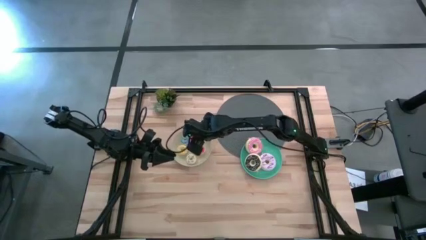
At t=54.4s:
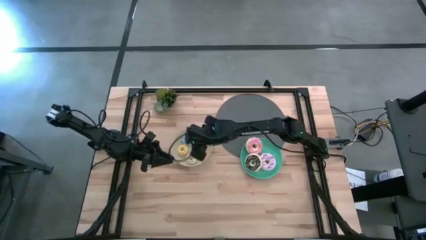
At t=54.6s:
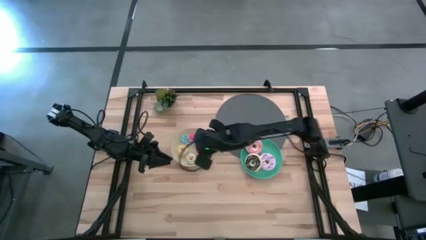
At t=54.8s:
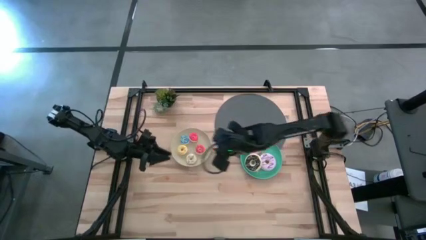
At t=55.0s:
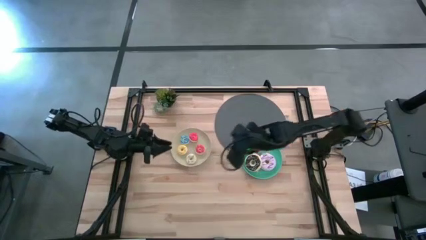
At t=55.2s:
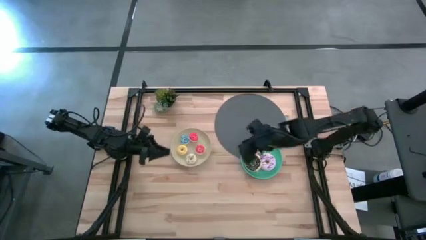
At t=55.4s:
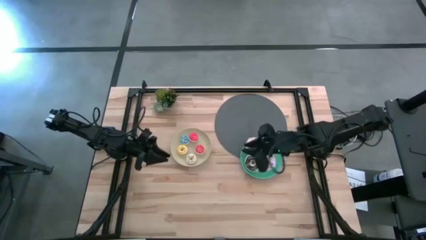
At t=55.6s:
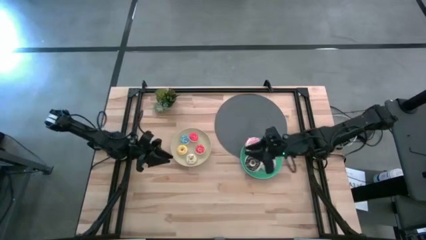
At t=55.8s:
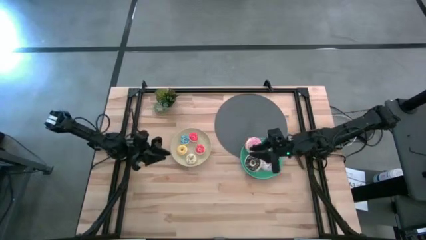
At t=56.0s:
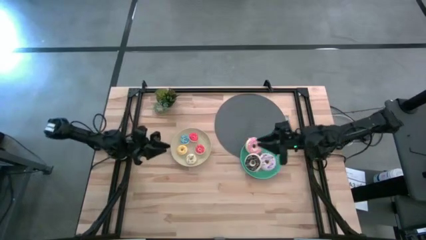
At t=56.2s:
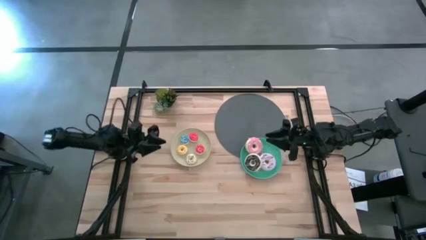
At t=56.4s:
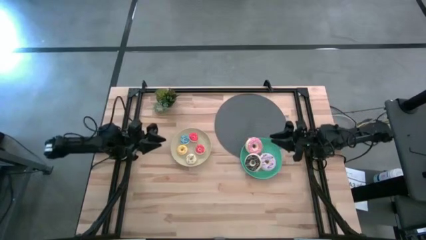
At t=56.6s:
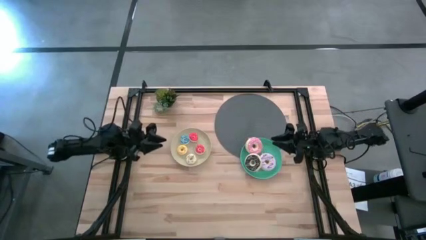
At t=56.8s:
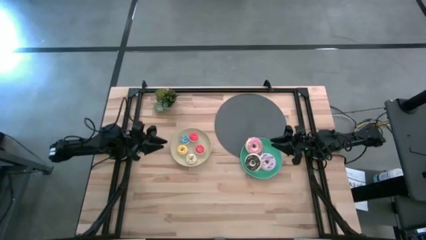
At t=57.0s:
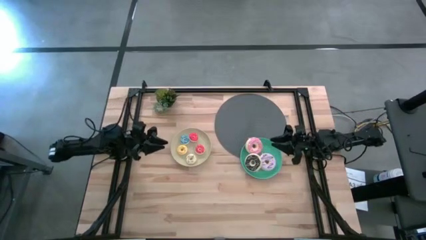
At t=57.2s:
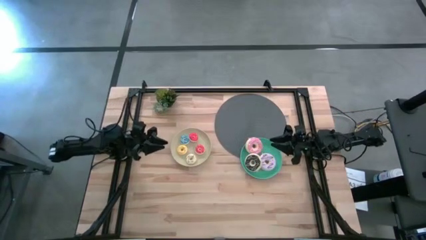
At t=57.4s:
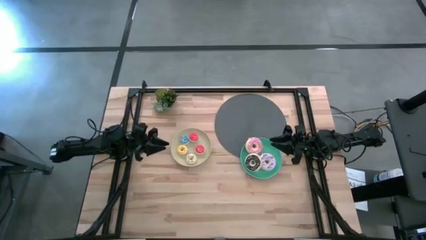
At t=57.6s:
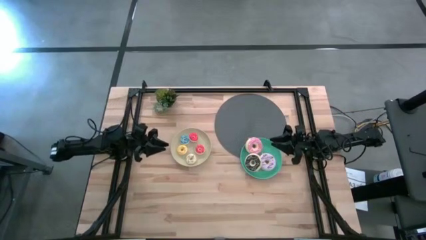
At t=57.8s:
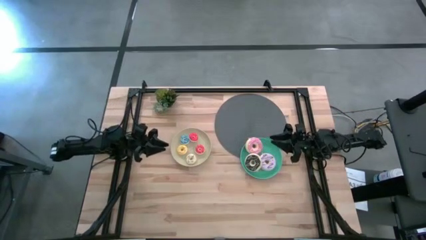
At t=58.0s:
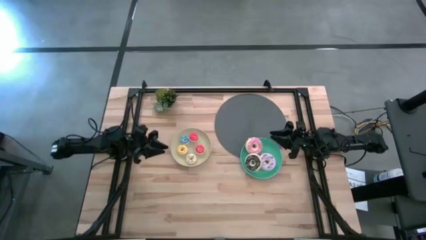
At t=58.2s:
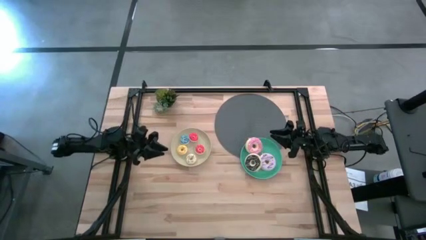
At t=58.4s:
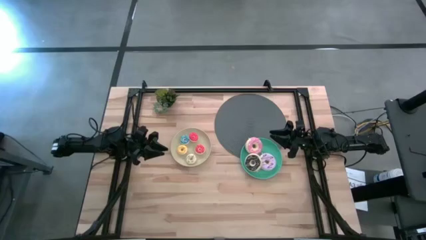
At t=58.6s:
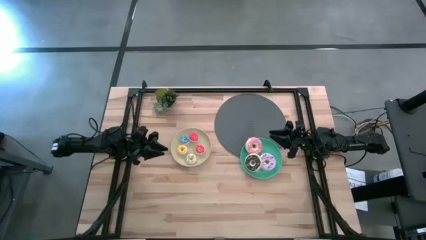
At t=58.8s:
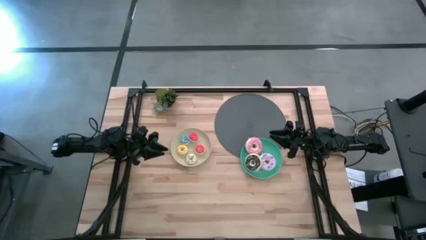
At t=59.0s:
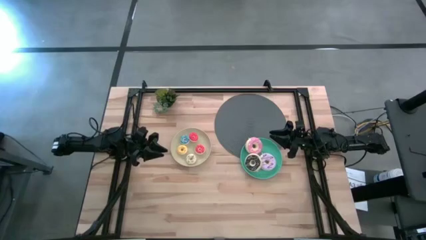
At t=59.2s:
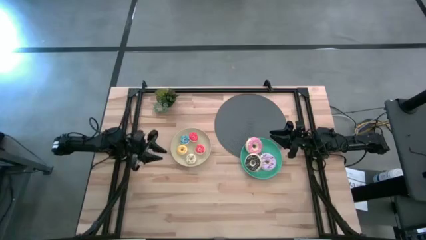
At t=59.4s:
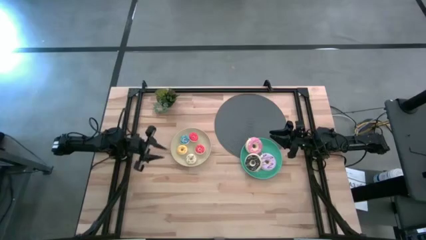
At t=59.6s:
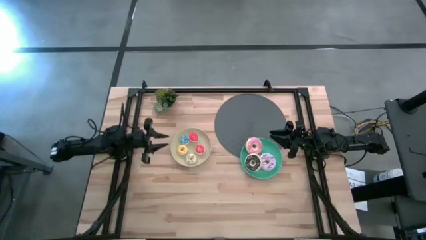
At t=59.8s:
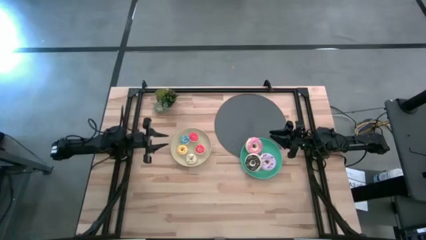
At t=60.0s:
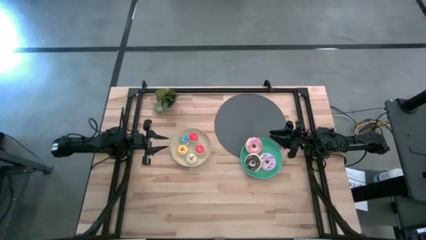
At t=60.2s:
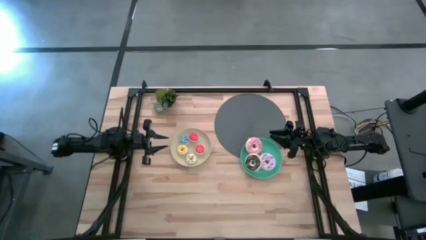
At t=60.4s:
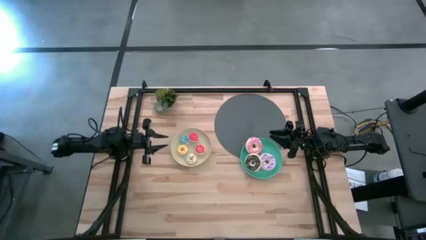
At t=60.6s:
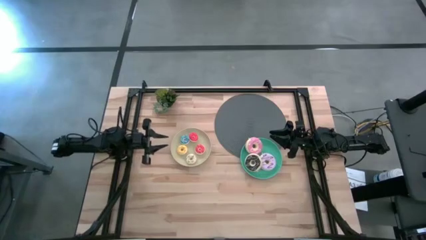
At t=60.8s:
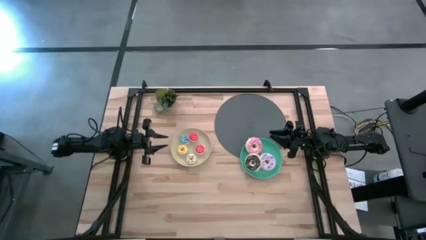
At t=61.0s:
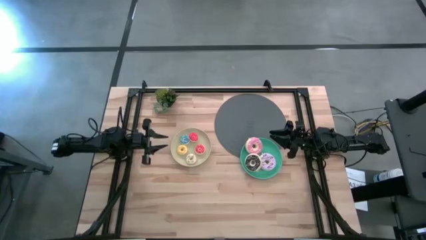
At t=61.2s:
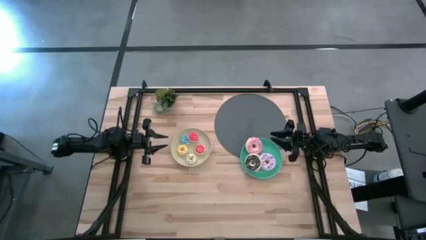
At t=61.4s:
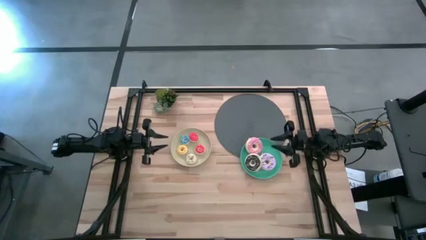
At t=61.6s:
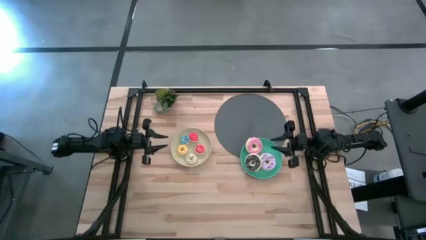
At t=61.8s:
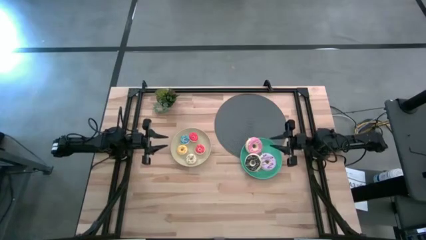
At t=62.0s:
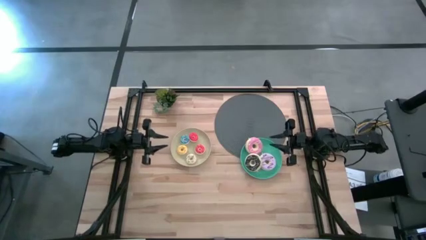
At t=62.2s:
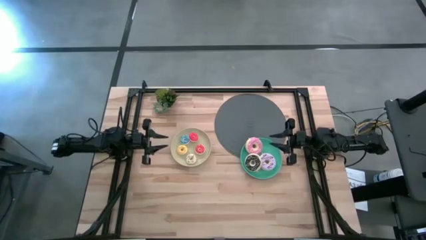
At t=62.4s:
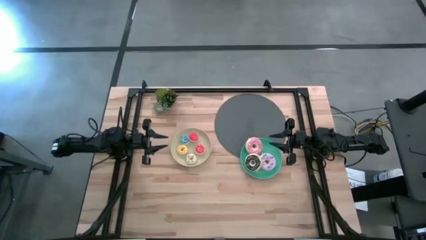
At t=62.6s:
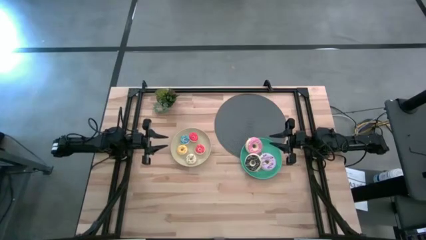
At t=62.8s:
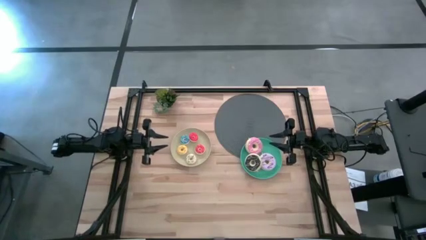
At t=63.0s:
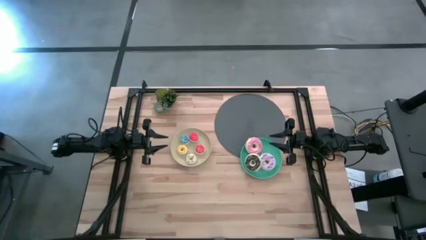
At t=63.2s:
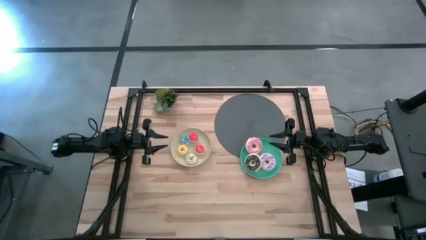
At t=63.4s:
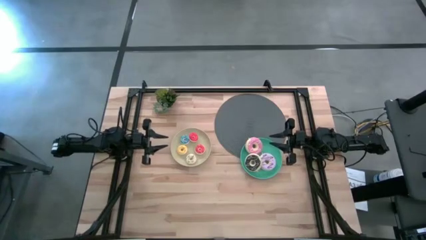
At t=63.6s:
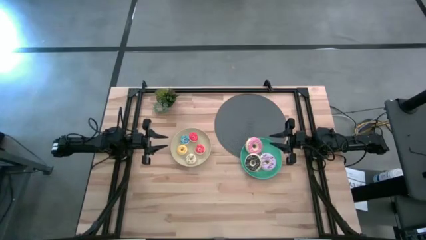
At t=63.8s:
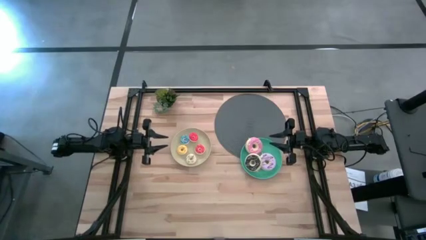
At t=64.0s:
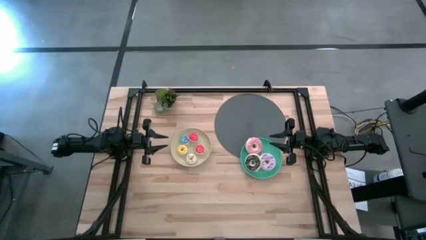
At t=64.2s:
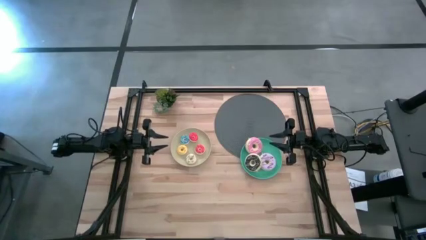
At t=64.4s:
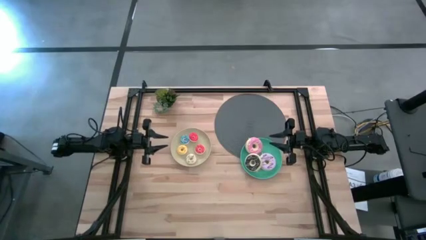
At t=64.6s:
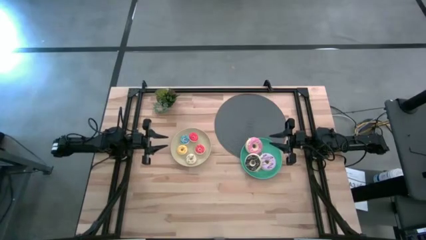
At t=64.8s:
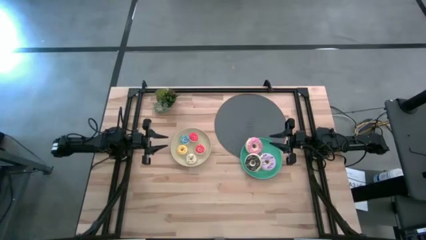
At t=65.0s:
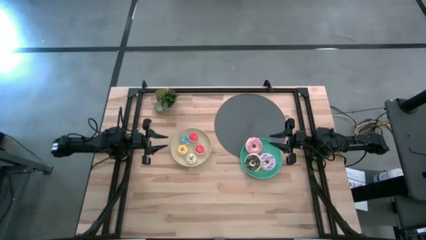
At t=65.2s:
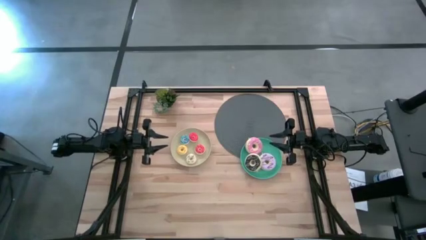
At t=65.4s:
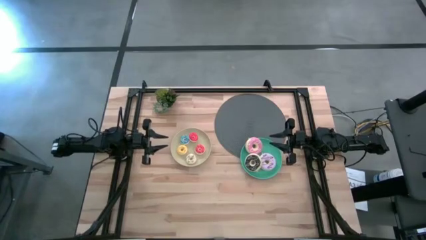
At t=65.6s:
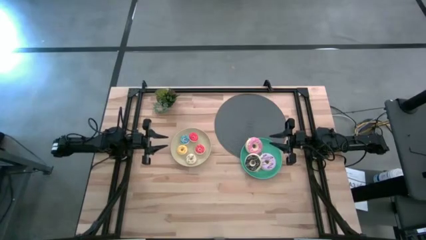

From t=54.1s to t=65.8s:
Task: Pick & Place donuts
Return to Home Position
